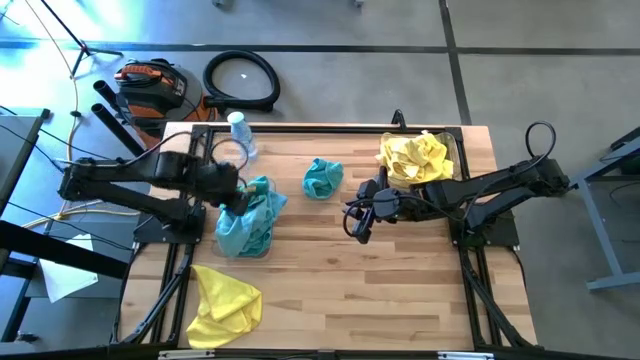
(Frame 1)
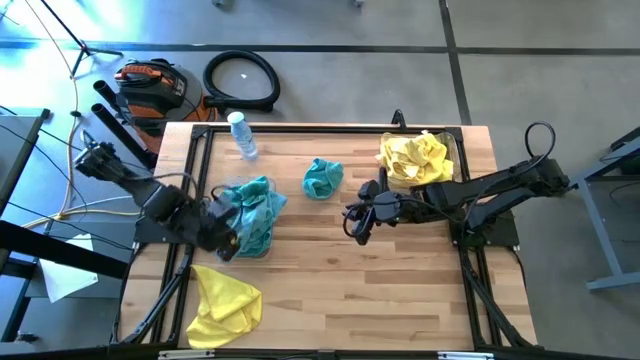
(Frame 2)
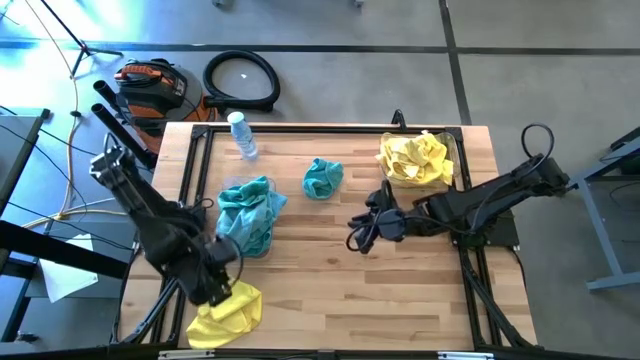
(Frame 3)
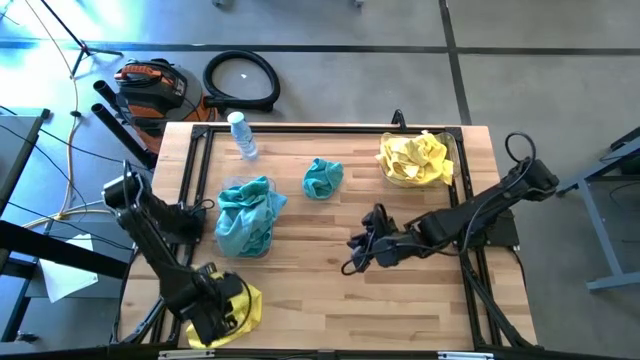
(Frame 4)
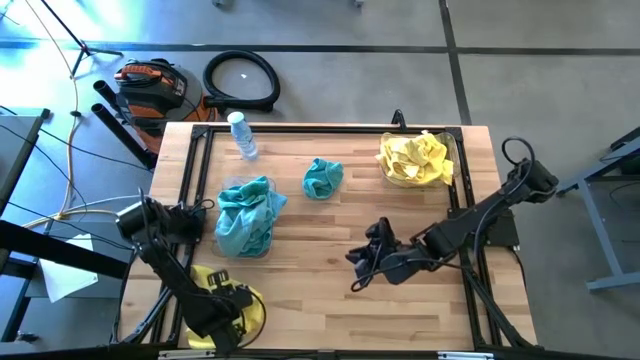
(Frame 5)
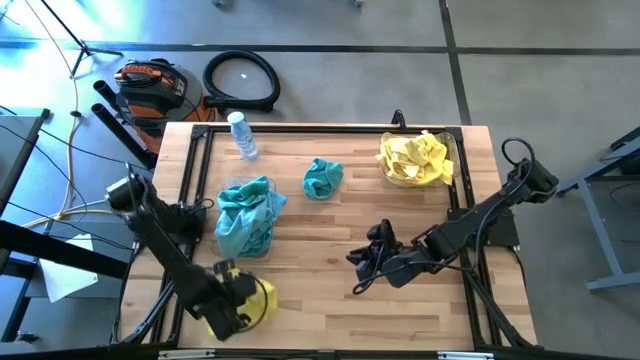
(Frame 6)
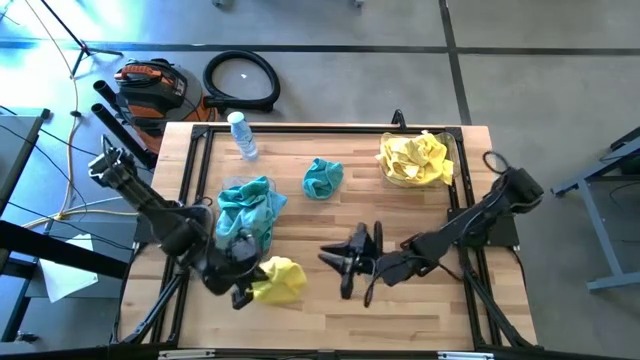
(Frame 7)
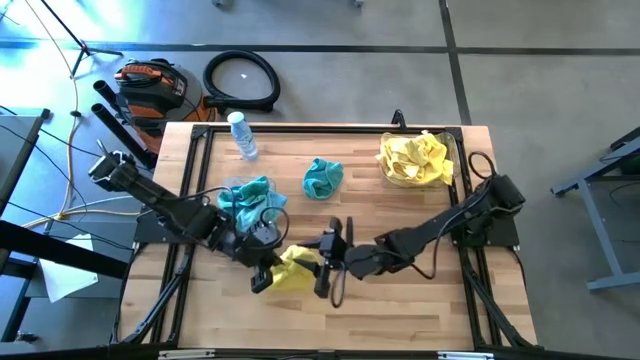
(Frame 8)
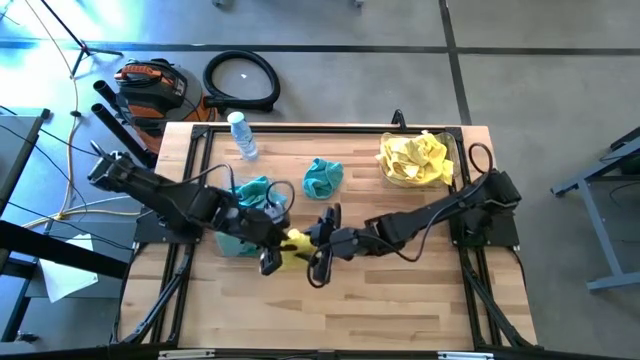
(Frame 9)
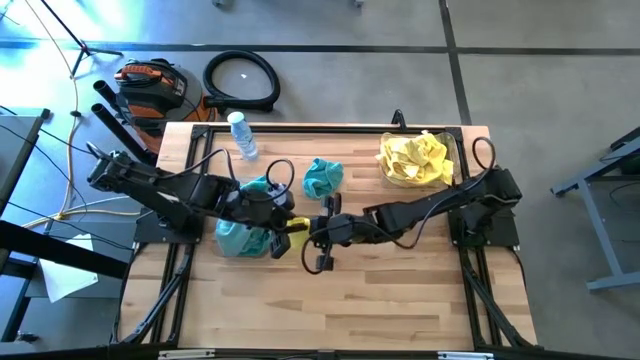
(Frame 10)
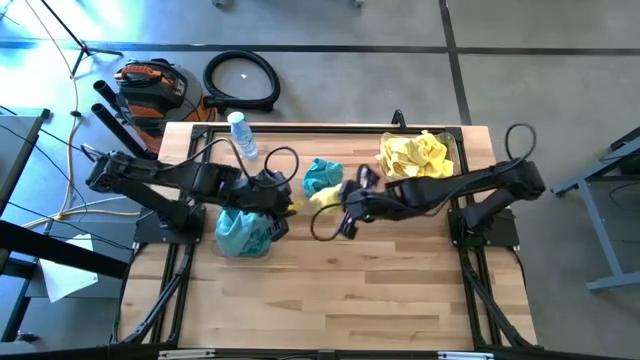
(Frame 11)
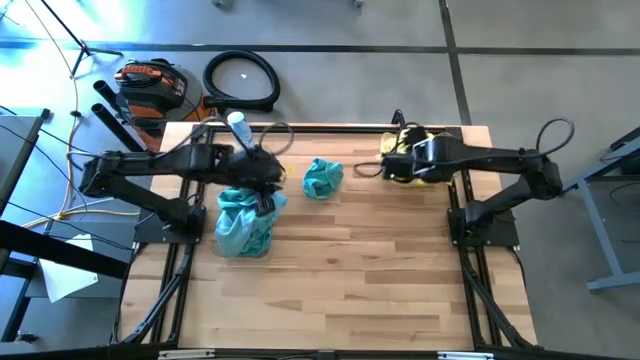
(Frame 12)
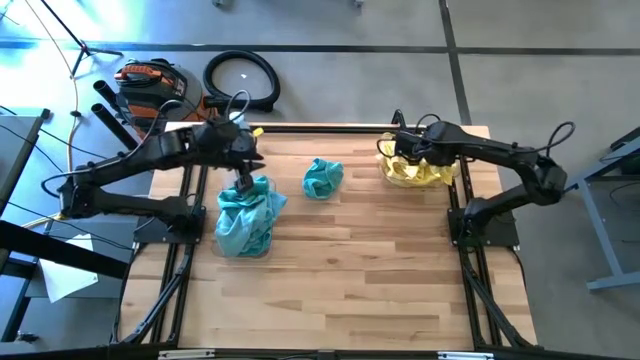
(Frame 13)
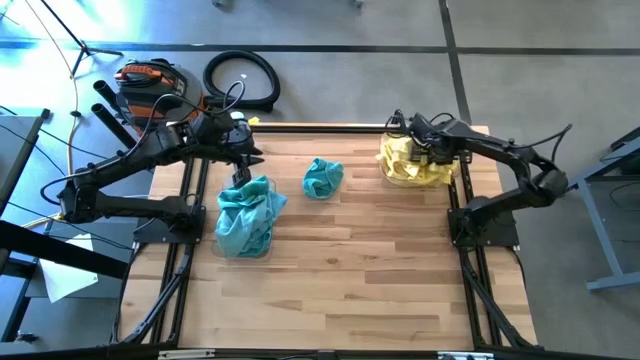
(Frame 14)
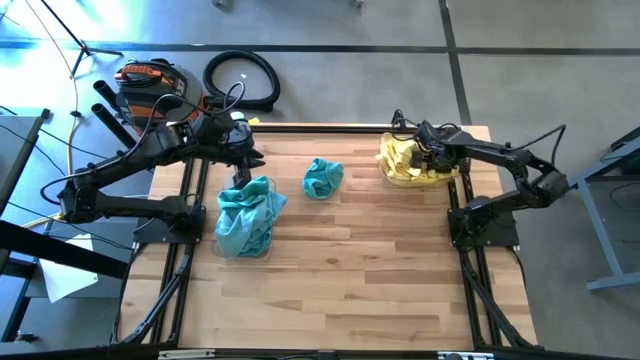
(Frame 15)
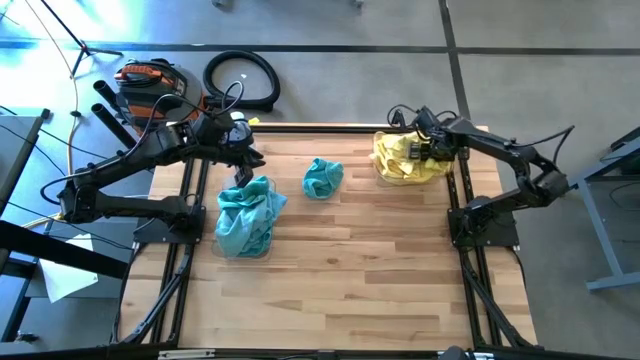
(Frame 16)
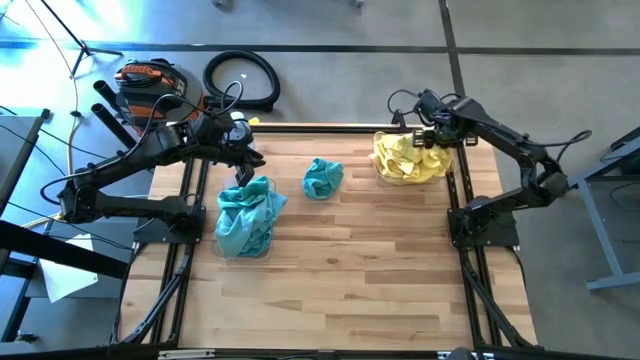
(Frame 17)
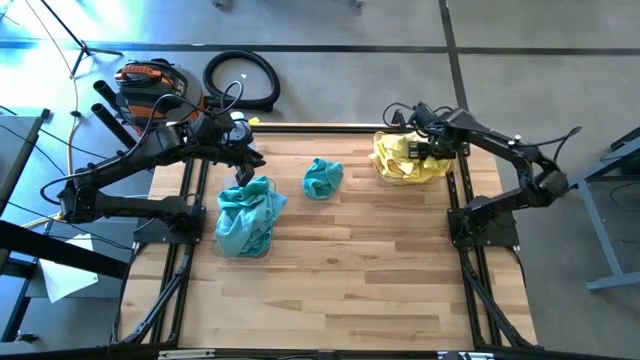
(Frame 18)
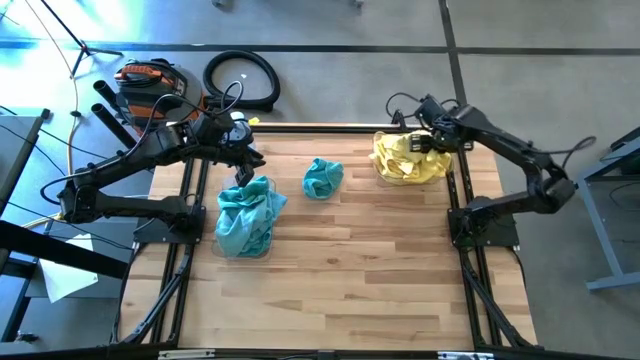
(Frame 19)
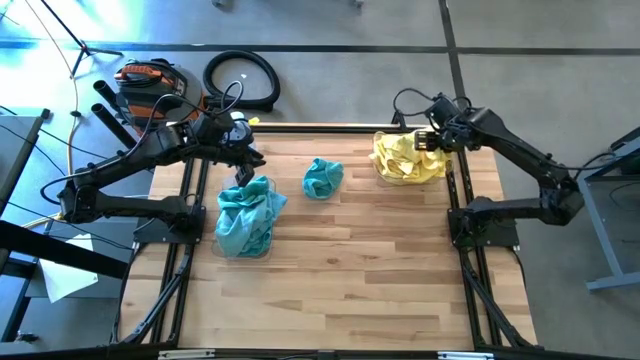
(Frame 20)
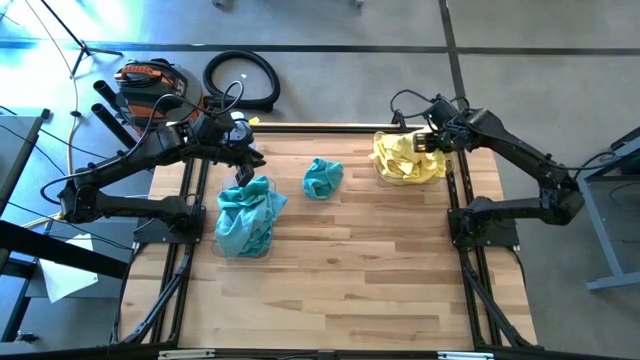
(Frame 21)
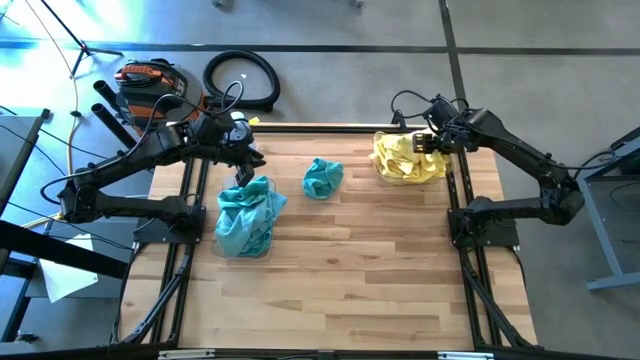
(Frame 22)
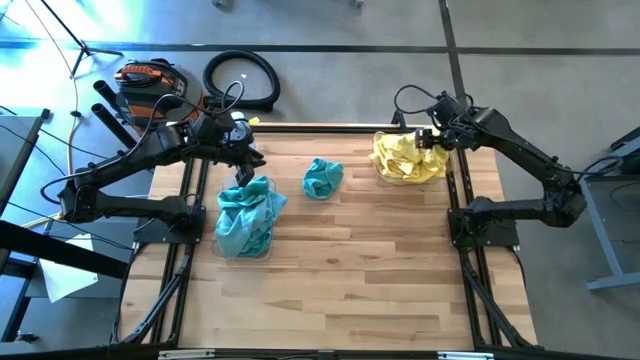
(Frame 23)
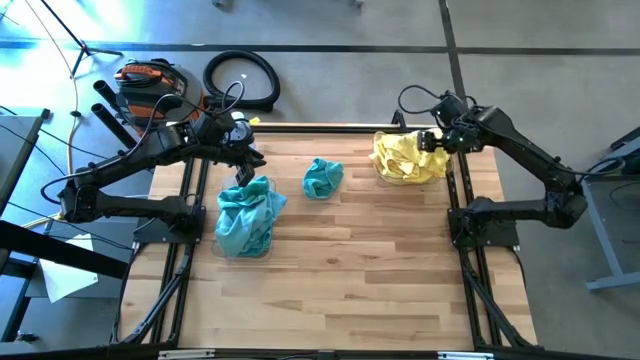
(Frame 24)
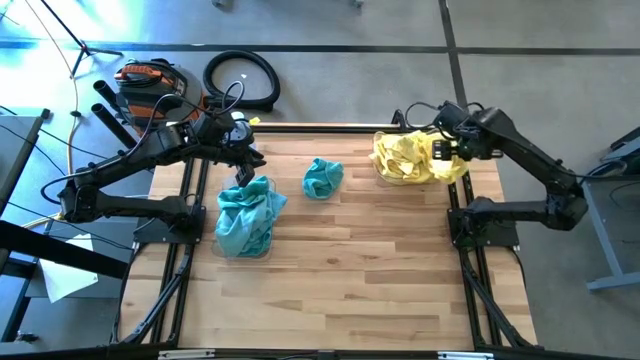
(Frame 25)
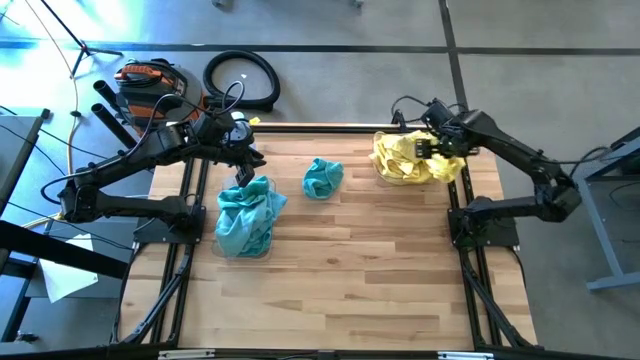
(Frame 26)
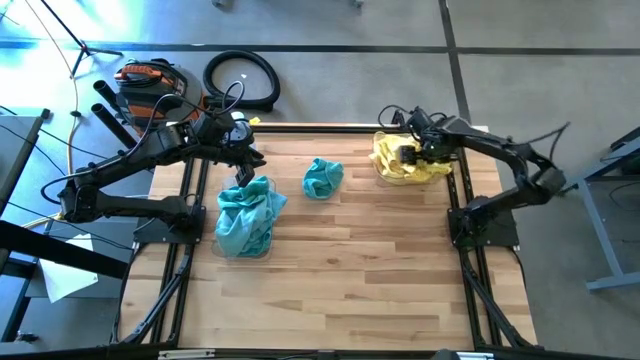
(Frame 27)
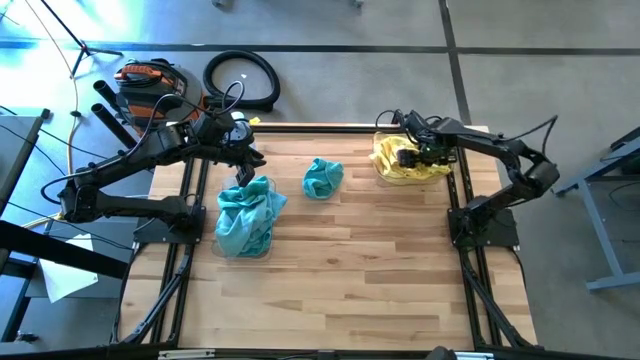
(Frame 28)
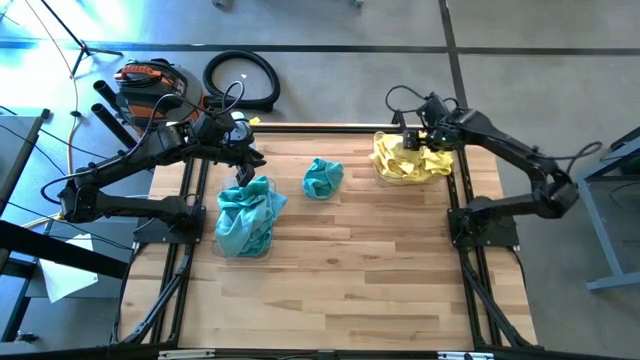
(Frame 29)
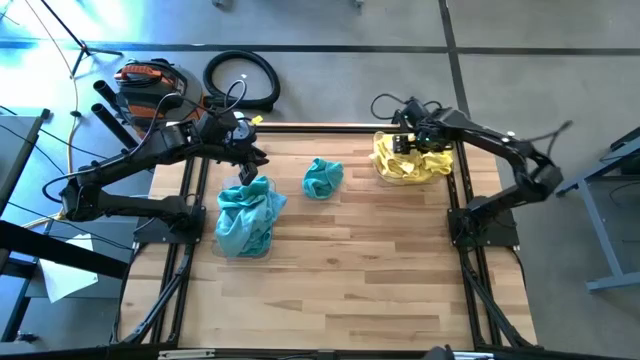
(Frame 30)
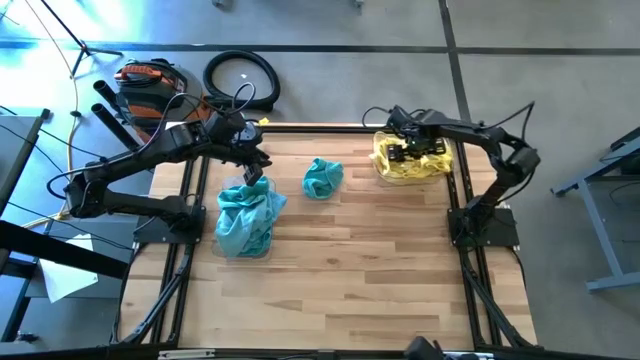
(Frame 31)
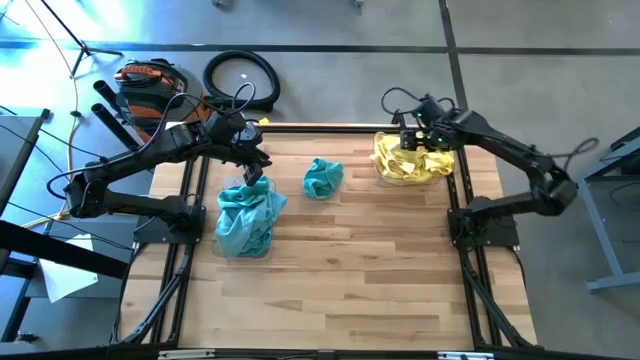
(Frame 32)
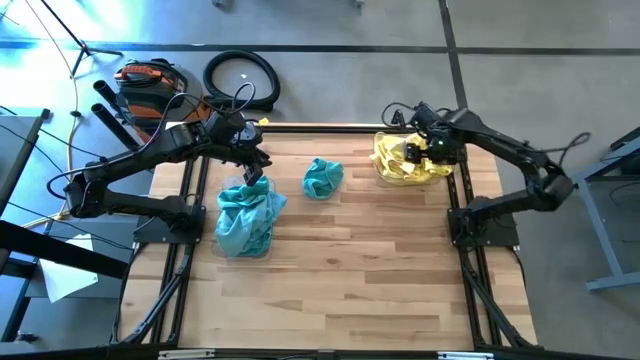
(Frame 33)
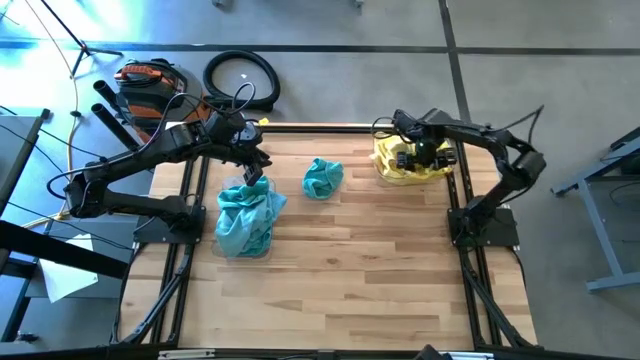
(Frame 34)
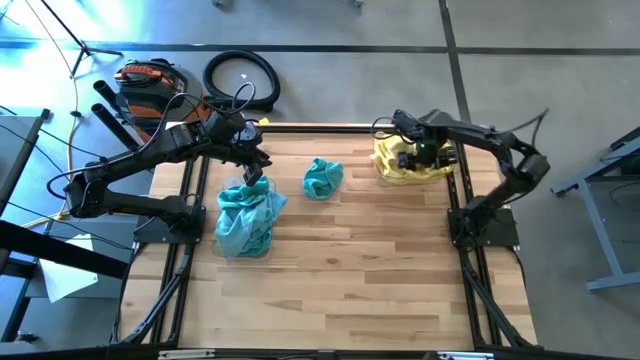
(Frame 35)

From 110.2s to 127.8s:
Task: Sort microfiber towel by color & place in baskets
Put the yellow microfiber cloth into the right transparent bin

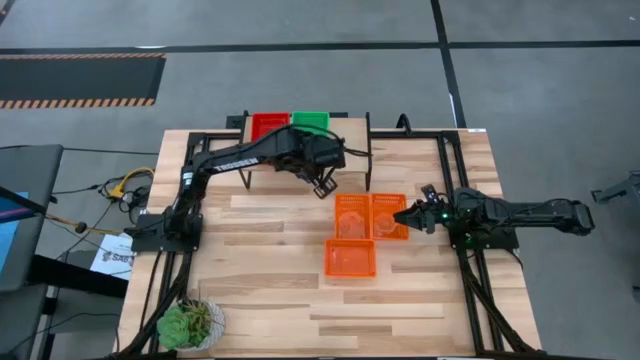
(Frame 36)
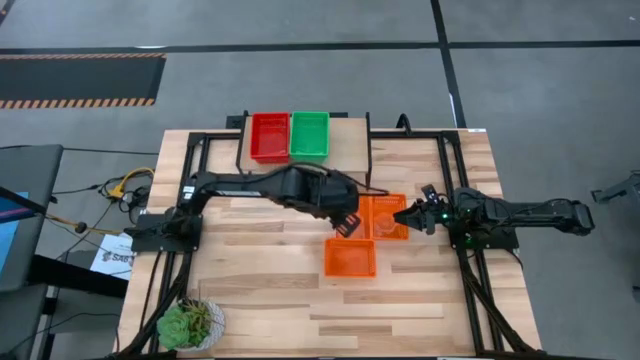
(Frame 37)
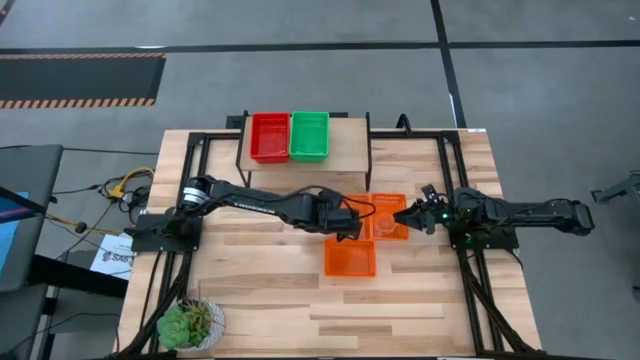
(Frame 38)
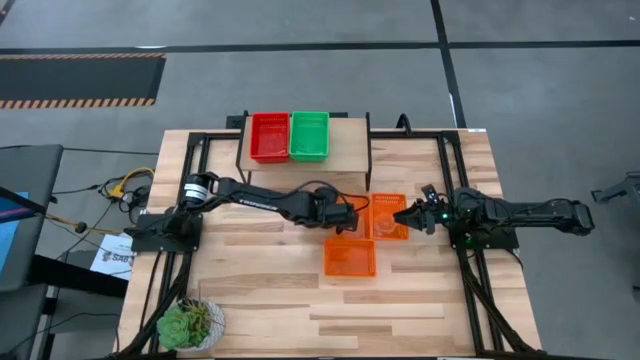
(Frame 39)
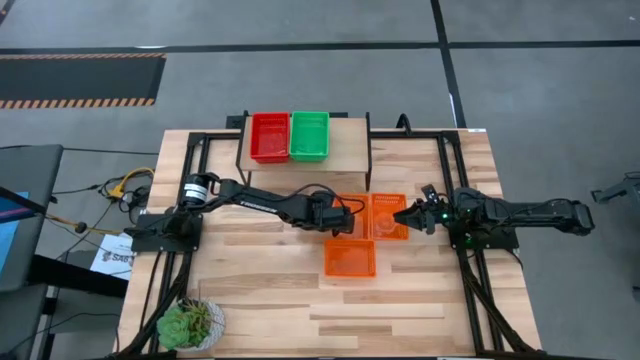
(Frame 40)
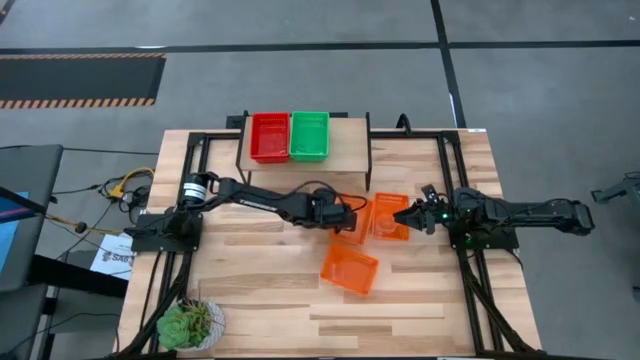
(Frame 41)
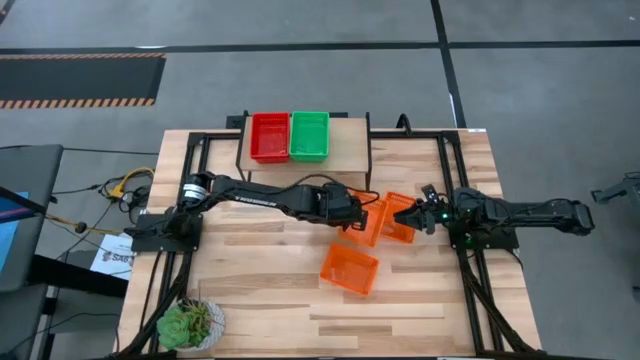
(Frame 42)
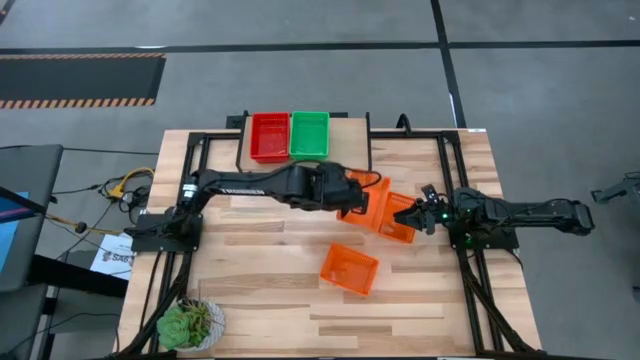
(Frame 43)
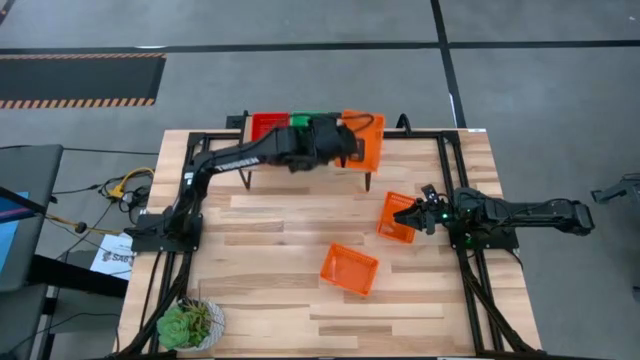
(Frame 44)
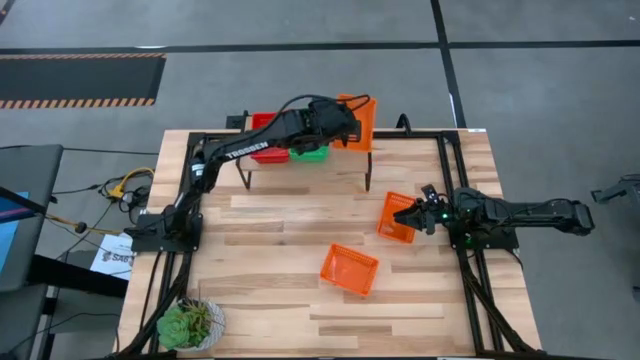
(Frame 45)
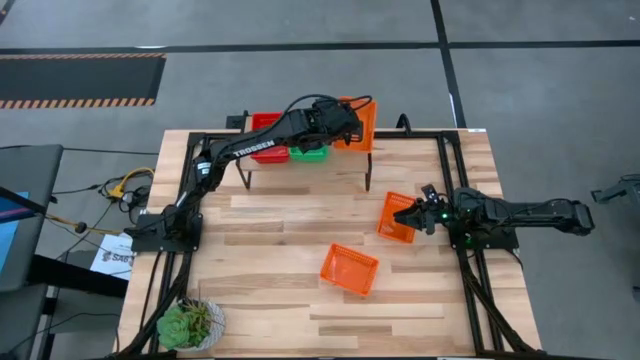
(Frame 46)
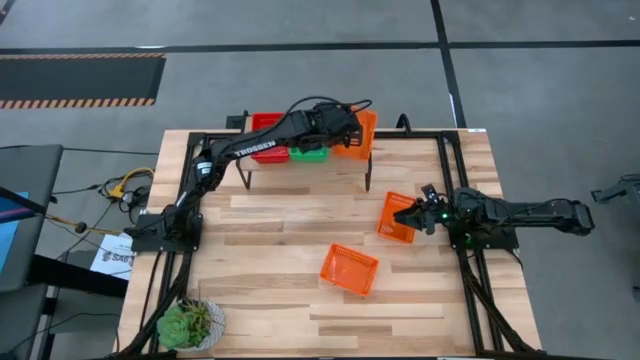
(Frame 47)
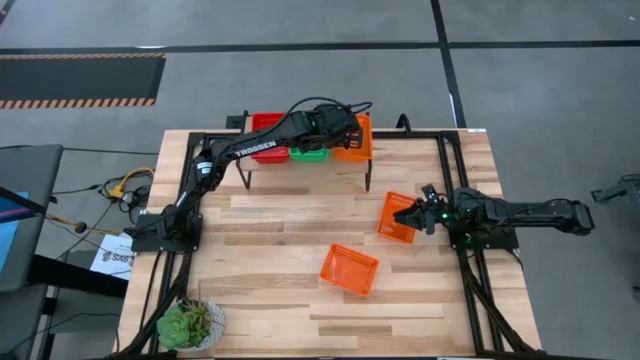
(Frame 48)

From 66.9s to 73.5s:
Task: Stack baskets on shelf by color
Put the left orange bin on the shelf
